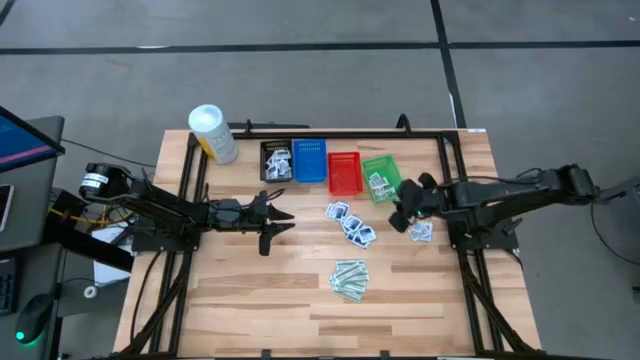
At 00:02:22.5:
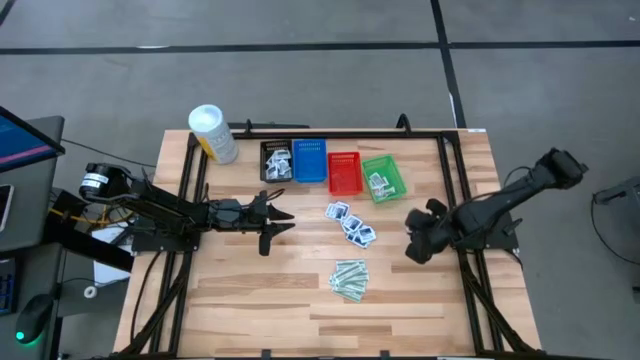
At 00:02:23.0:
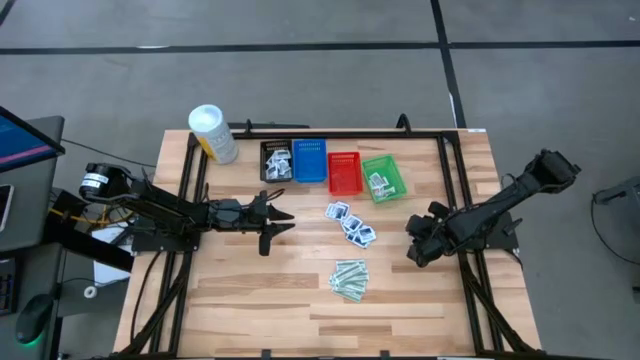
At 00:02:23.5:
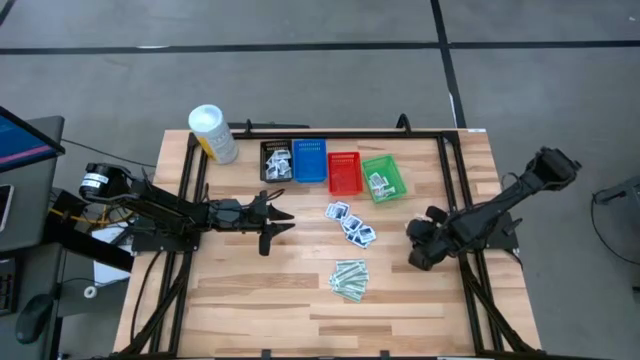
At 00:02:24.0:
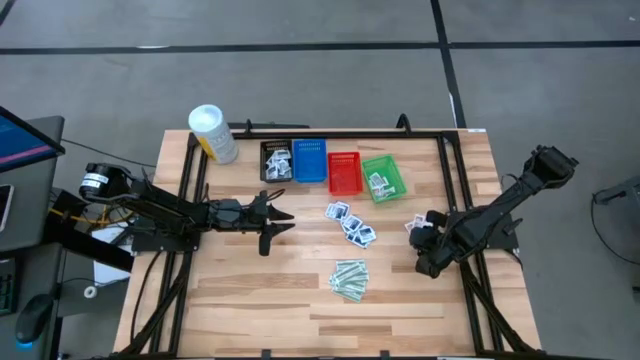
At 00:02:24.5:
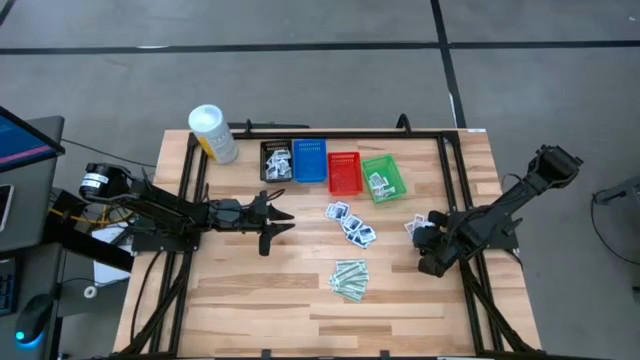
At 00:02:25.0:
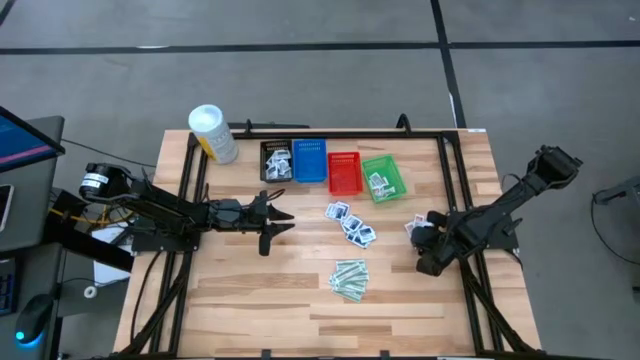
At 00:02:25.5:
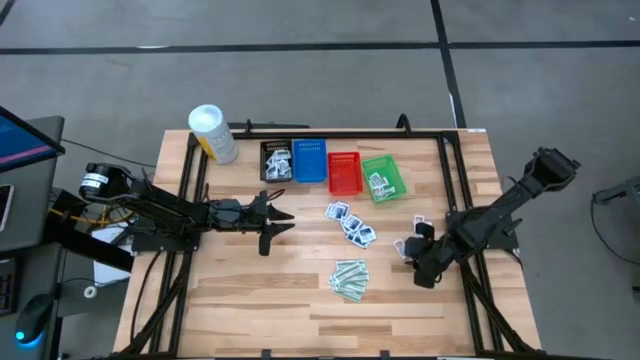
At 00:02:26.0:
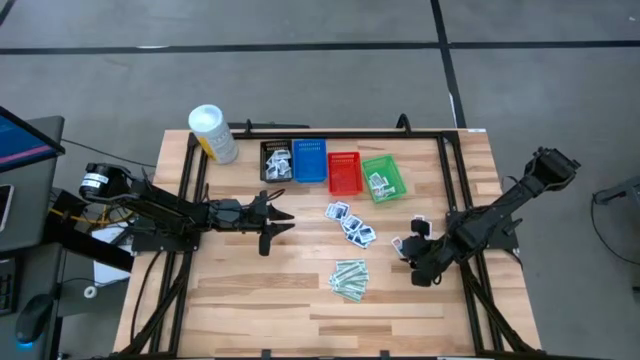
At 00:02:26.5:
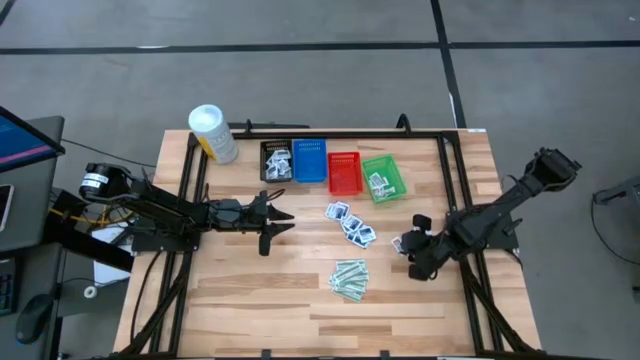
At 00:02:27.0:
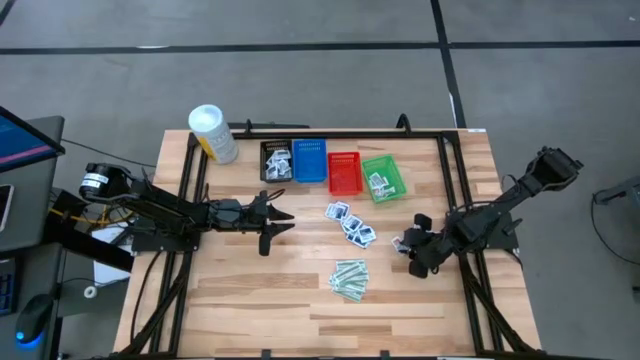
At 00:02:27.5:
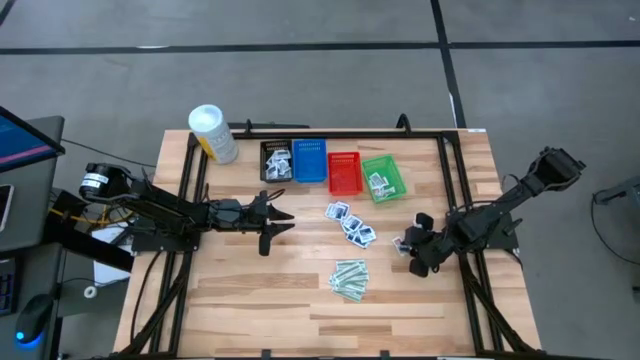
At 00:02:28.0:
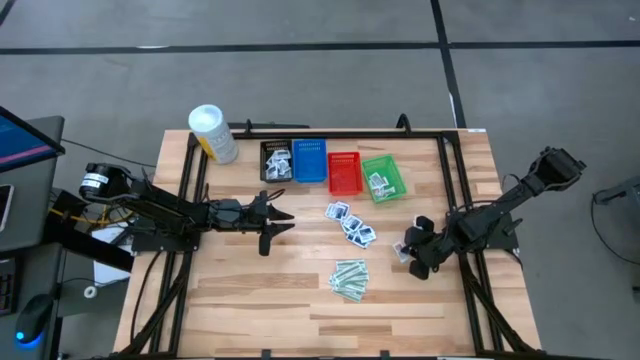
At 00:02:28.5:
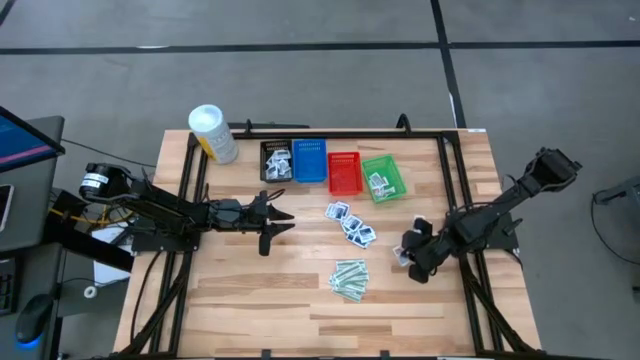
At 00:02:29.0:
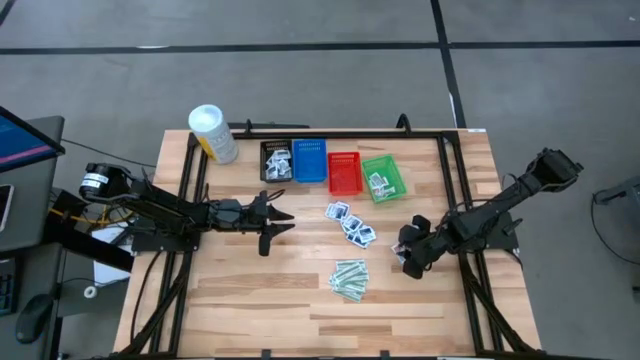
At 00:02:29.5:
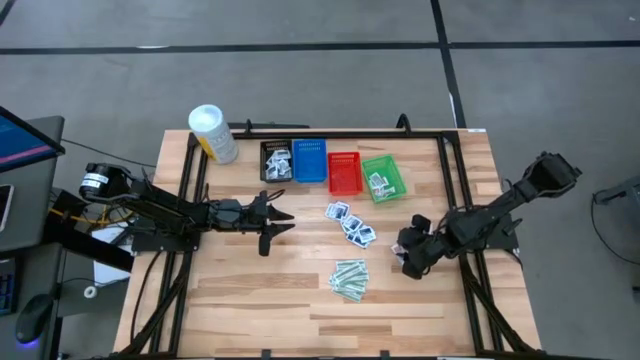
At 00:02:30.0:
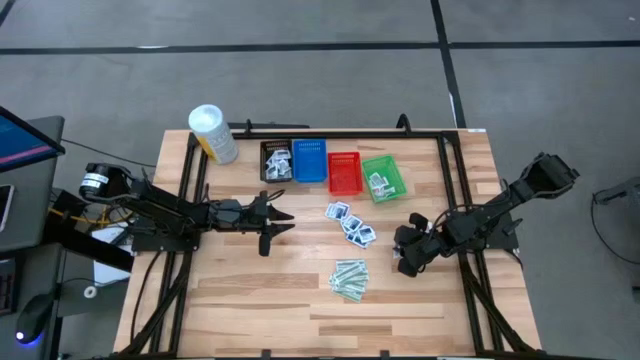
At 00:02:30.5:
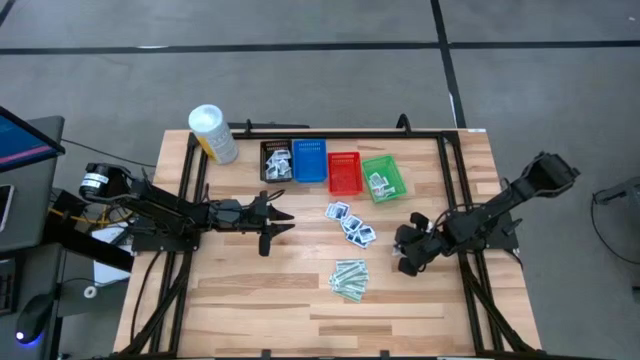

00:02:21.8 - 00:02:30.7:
Task: Pick & Place First Aid Supplies
Put the orange pad into the green bin

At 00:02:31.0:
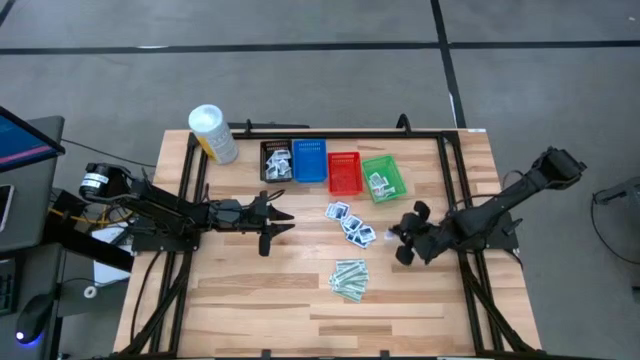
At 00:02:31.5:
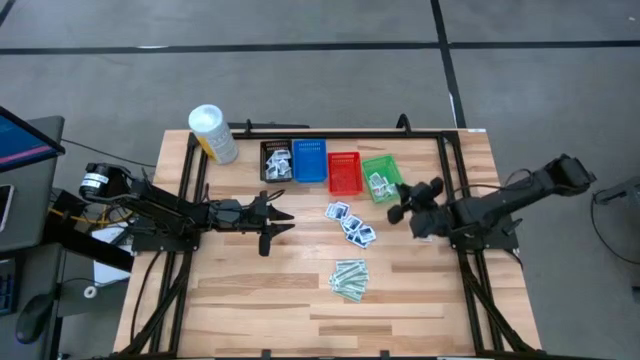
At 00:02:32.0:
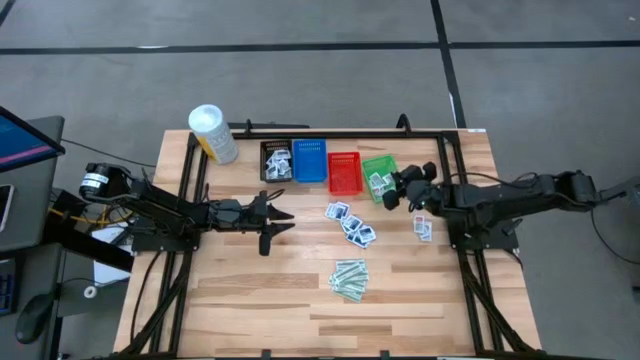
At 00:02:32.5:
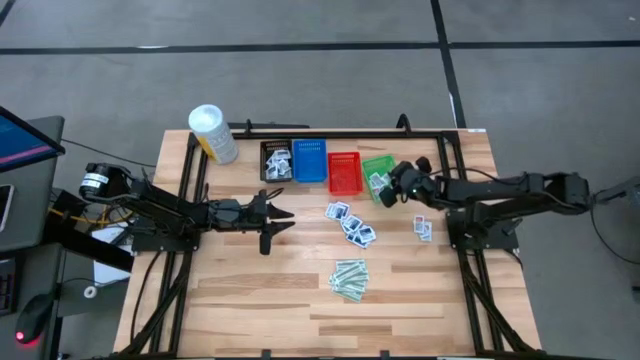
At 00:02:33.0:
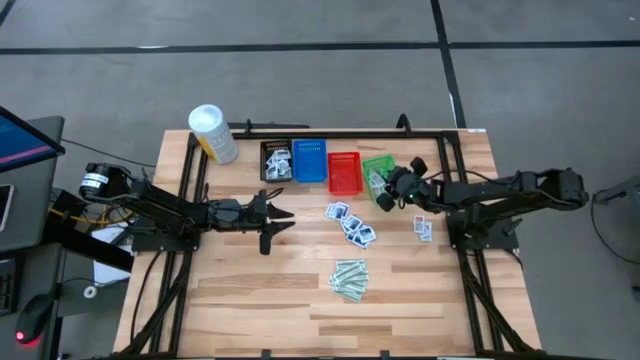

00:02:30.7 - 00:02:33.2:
Put the antibiotic ointment into the green basket

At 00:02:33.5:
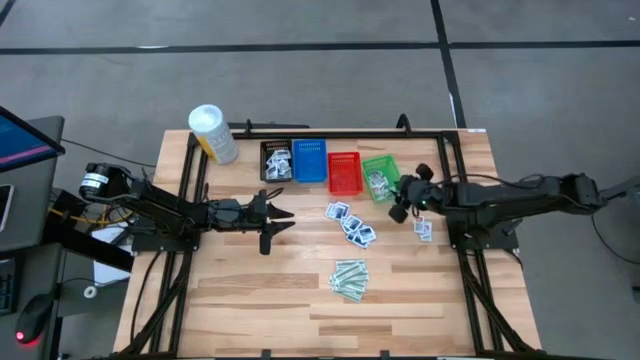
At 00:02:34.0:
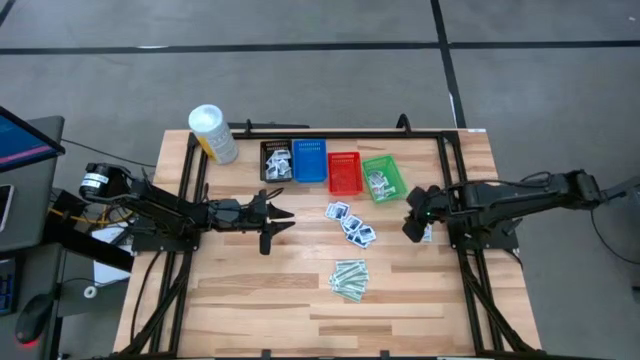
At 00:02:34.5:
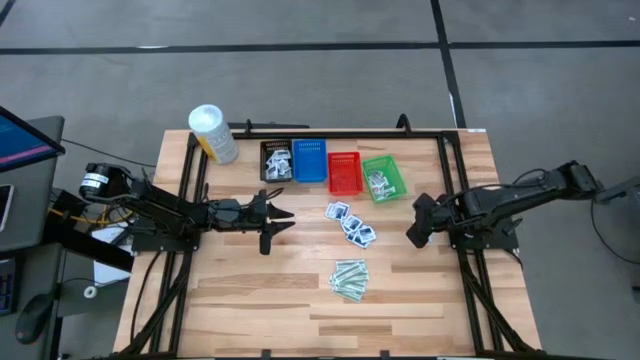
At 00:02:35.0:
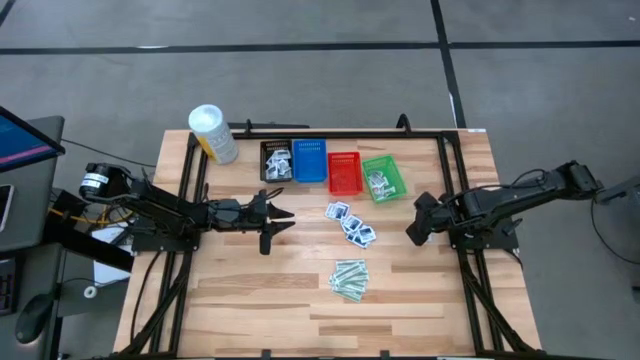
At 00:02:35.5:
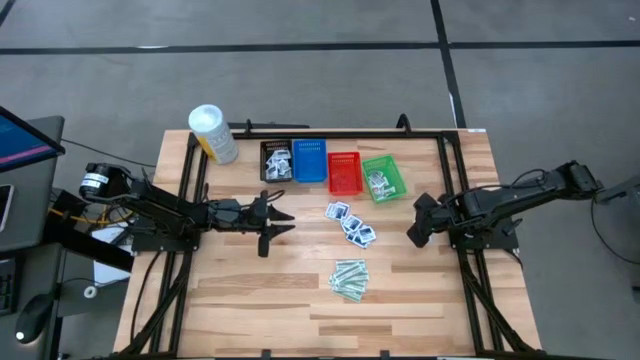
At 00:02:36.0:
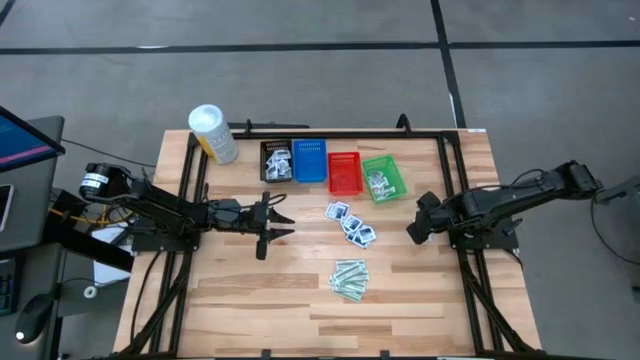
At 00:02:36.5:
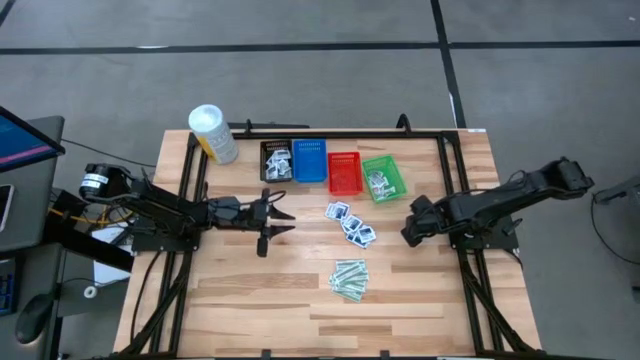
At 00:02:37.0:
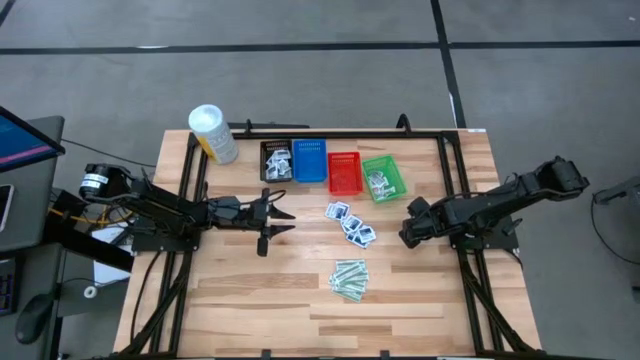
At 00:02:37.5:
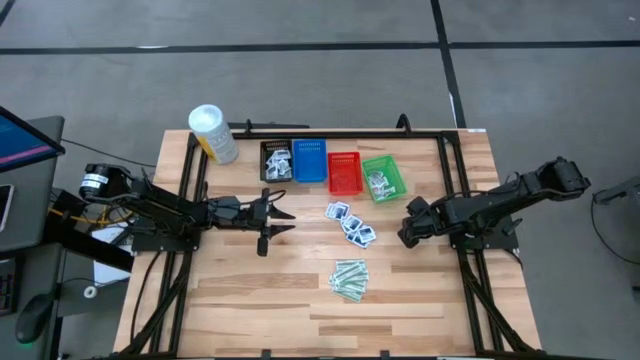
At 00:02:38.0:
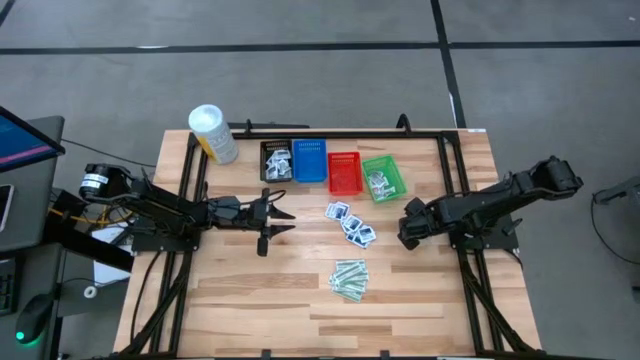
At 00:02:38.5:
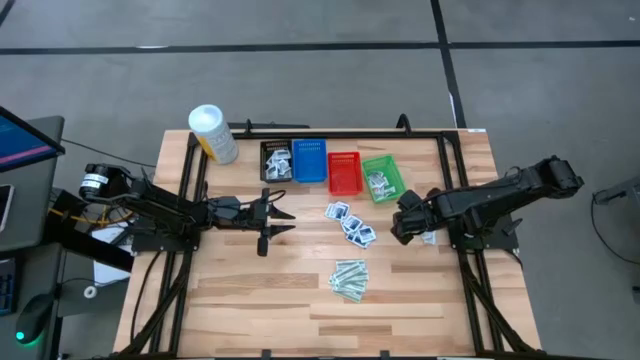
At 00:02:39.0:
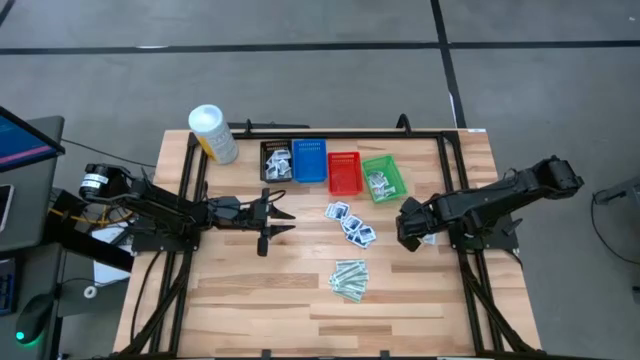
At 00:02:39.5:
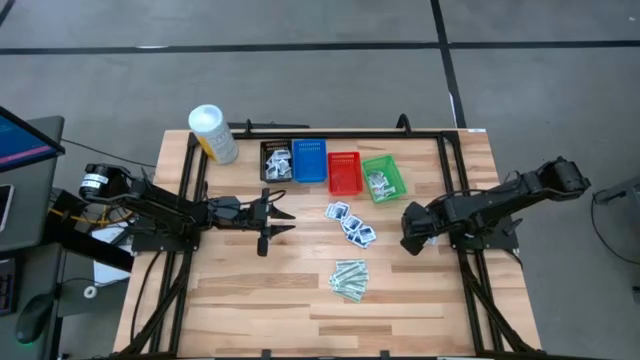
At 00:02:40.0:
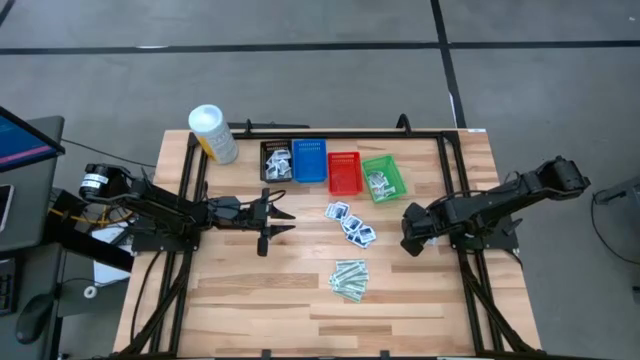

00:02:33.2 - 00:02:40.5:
Put the orange pad into the green bin

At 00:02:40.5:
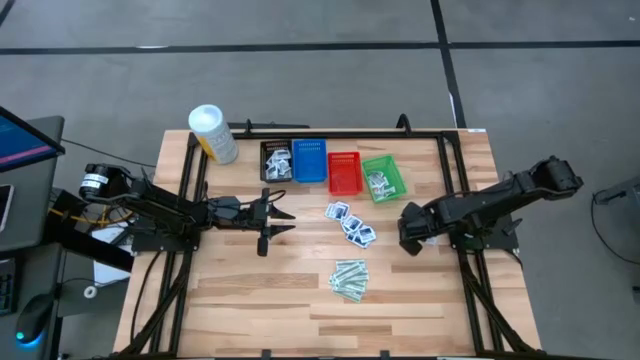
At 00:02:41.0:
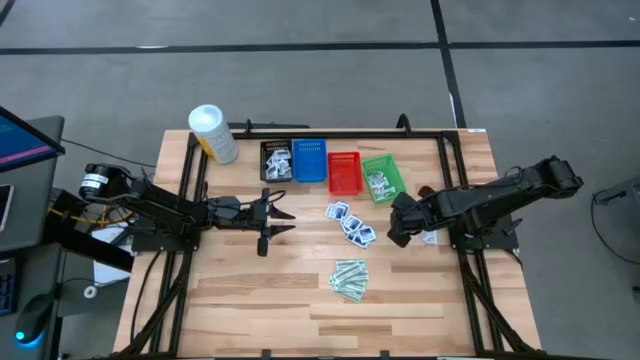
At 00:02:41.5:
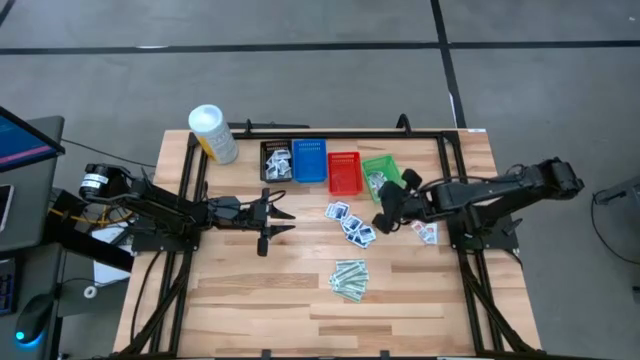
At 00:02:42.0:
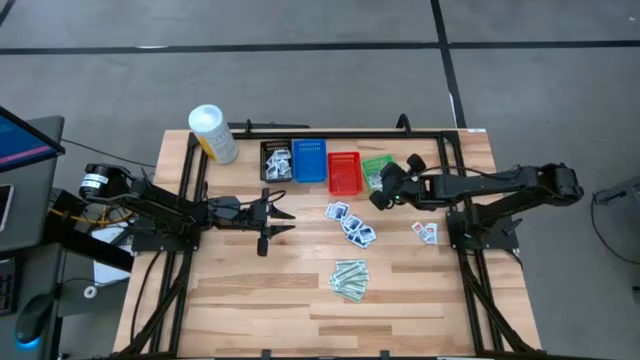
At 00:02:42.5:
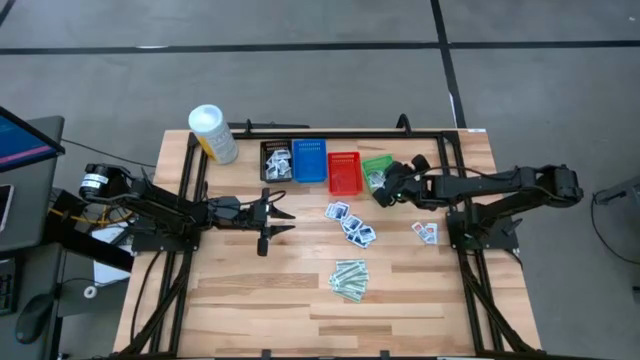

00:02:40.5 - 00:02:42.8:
Put the orange pad into the green bin
